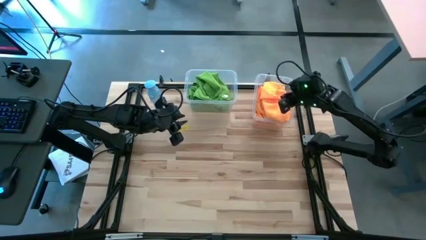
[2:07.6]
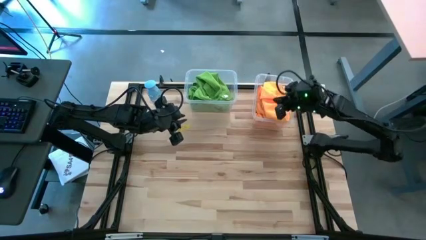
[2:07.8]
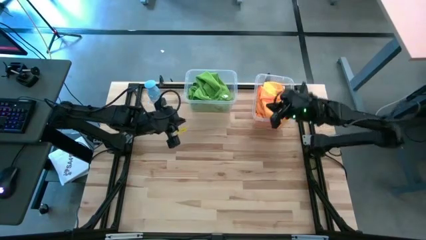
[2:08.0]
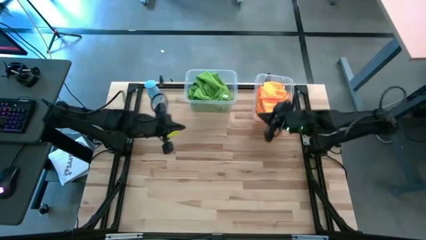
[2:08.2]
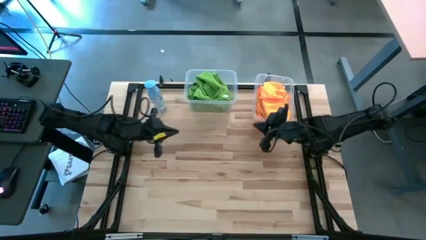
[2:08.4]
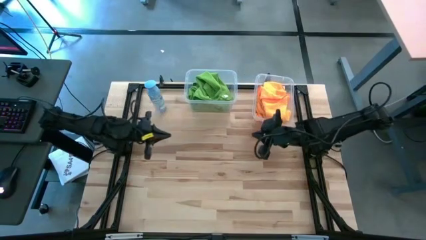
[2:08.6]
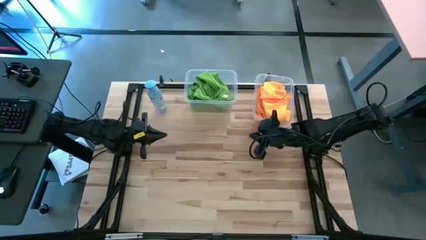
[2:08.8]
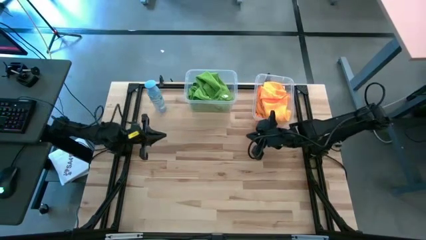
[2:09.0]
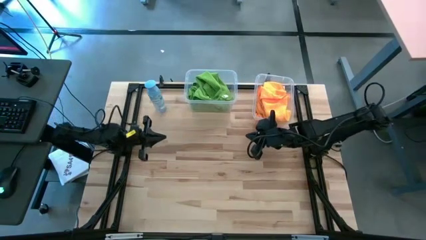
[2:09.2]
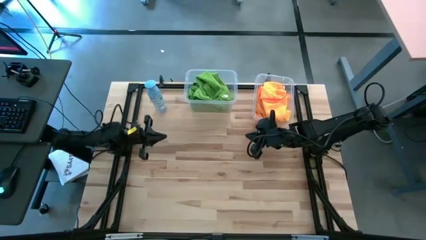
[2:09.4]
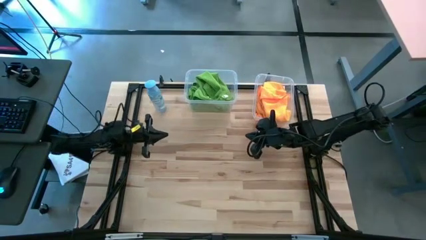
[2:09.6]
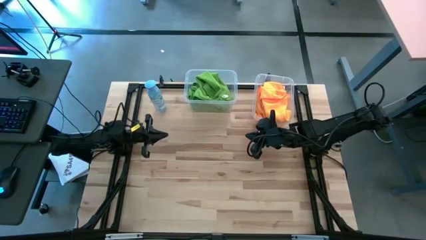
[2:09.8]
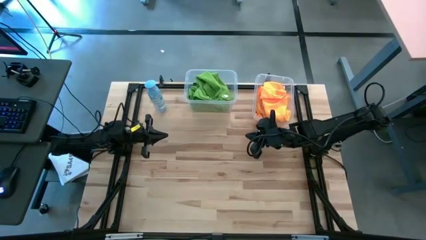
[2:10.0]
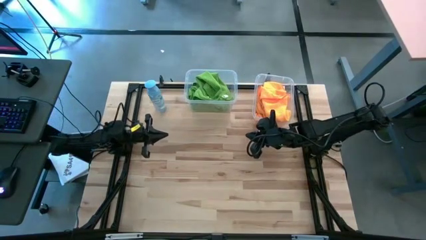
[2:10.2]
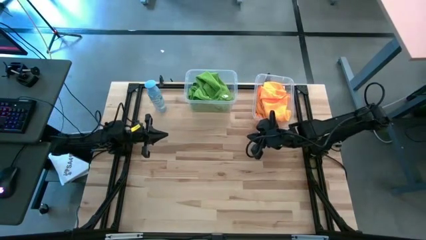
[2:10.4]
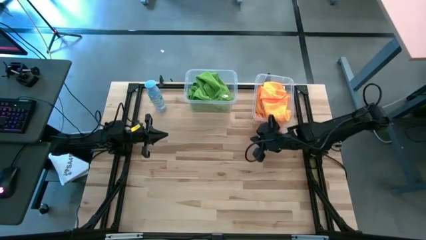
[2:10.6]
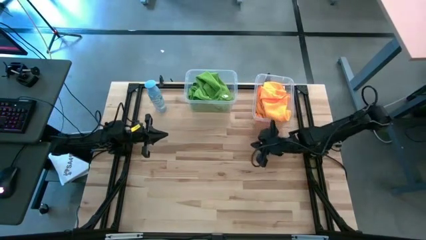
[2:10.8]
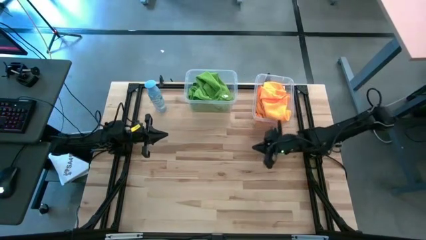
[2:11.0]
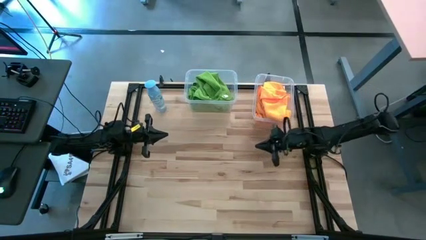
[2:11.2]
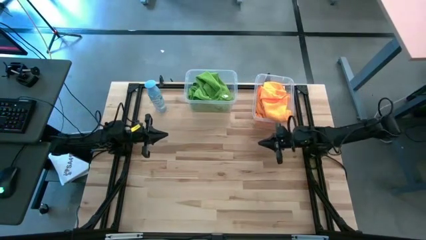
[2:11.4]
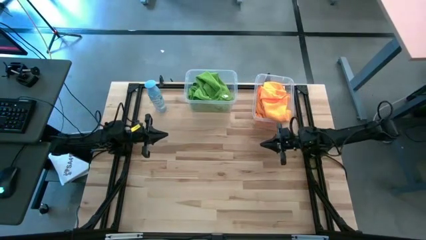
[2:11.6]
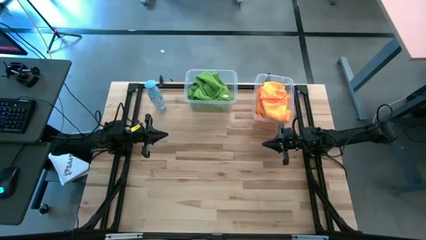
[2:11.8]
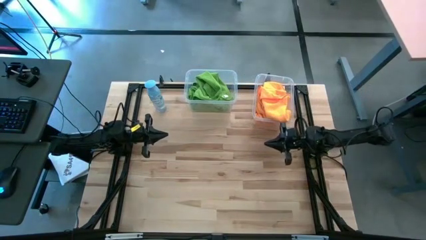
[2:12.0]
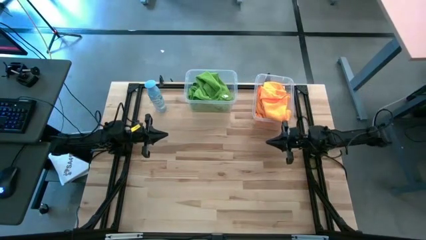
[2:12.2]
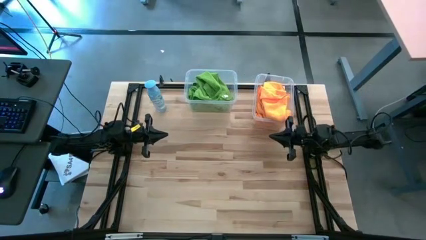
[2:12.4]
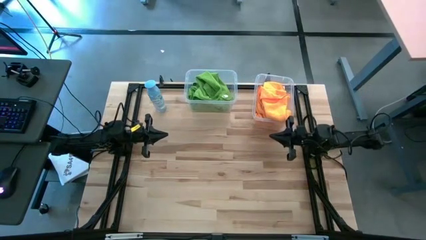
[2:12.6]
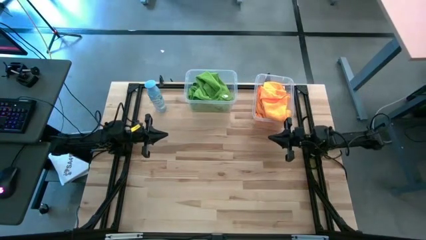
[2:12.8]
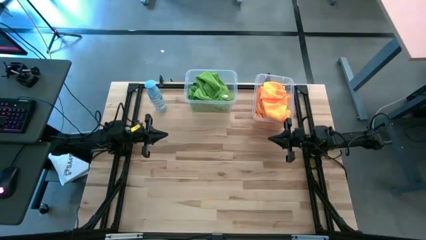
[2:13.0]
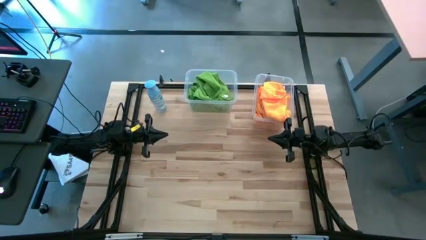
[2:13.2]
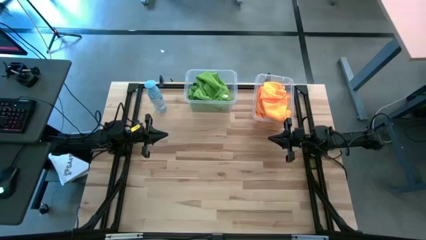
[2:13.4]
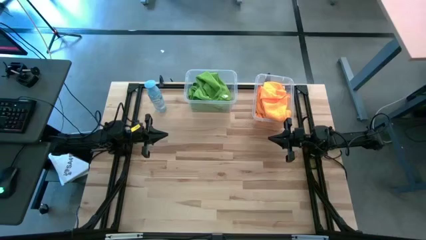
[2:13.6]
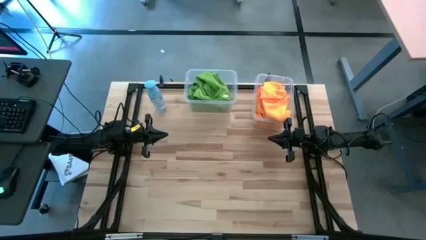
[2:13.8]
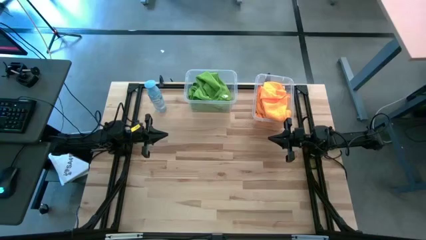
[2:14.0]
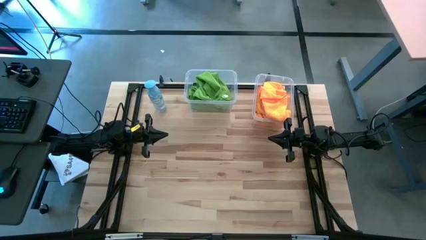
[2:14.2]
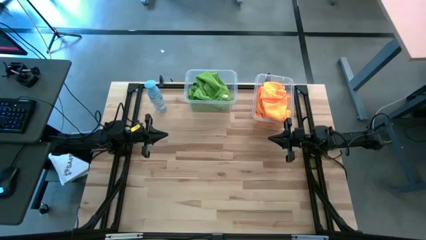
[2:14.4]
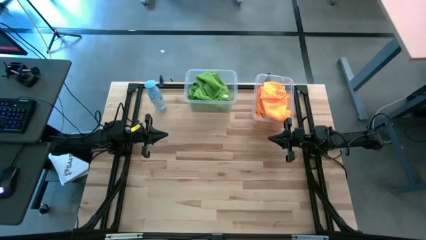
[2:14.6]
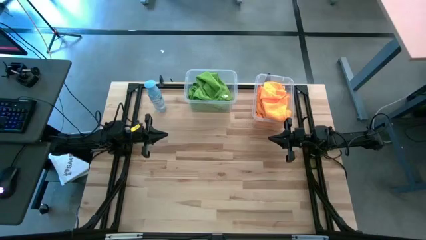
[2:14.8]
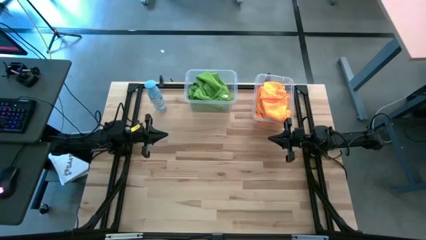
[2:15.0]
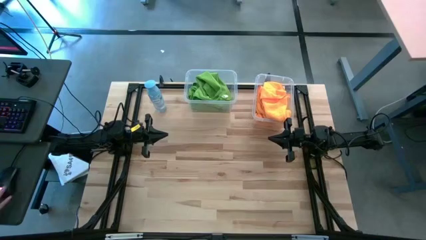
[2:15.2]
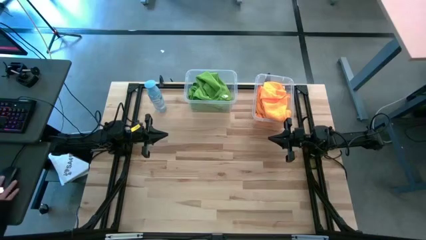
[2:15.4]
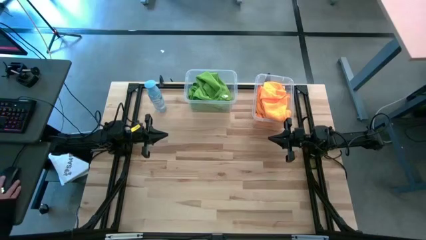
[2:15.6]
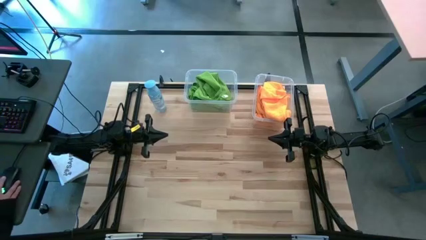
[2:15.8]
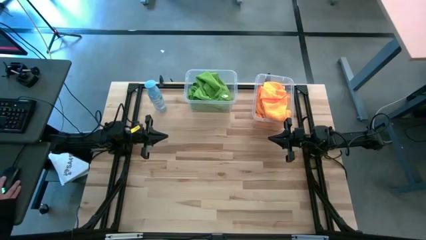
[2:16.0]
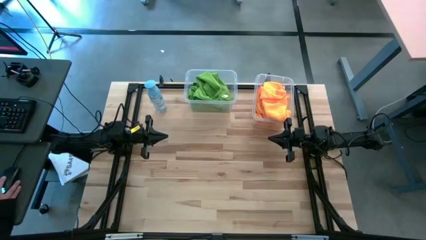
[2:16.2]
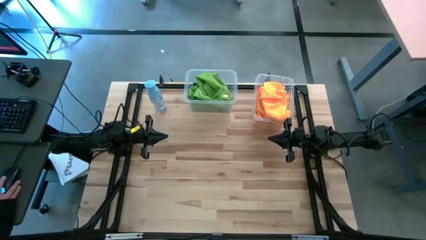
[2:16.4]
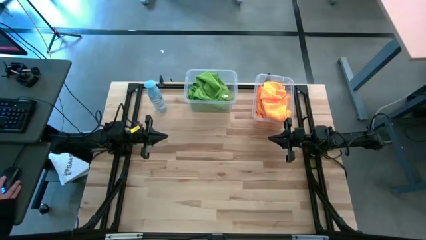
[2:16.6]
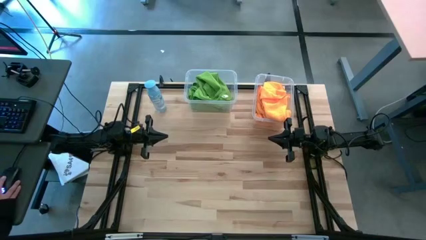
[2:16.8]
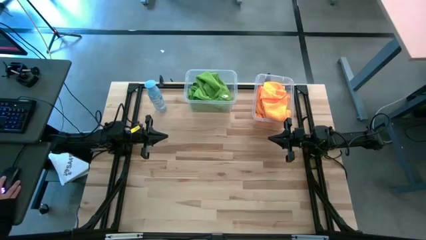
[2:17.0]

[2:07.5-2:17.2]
Task: Sort microfiber towel by color & place in baskets
Return to Home Position

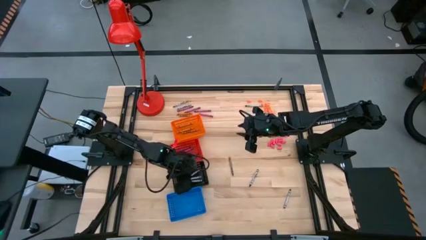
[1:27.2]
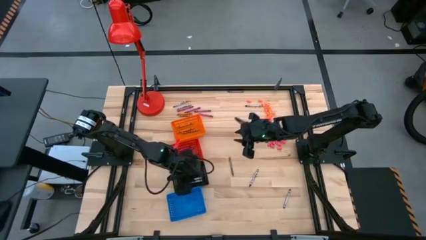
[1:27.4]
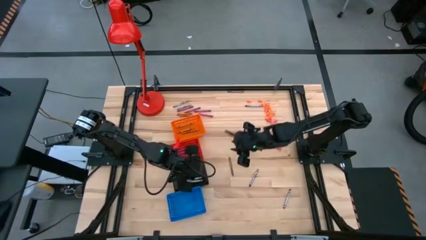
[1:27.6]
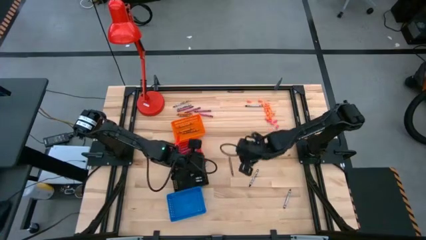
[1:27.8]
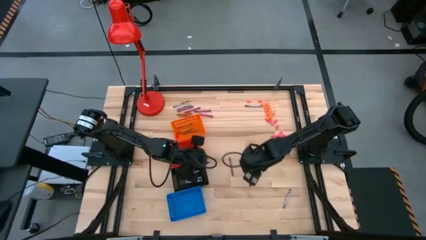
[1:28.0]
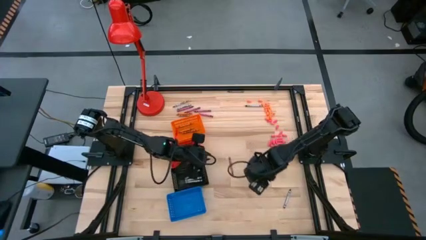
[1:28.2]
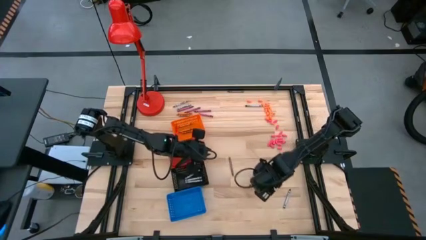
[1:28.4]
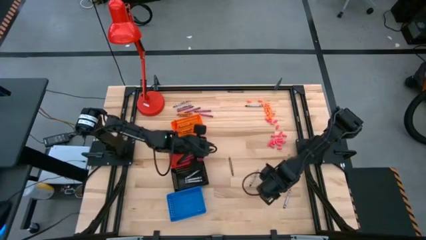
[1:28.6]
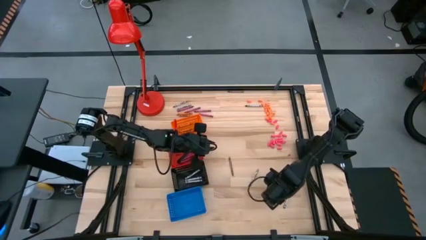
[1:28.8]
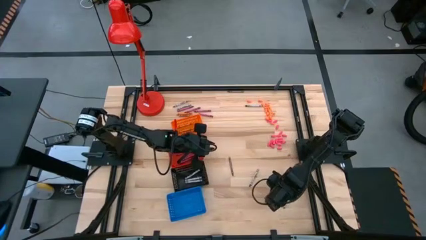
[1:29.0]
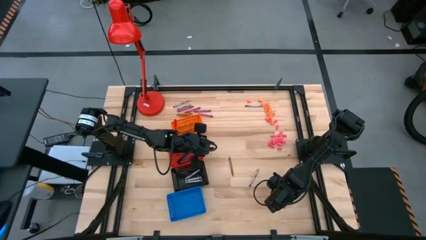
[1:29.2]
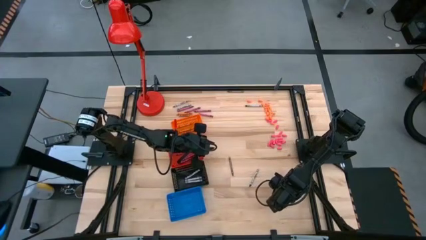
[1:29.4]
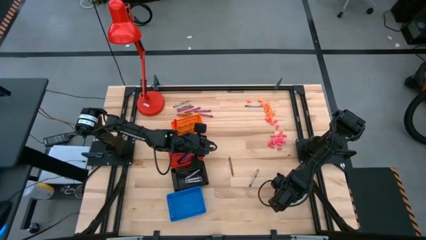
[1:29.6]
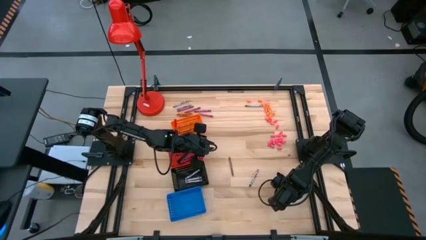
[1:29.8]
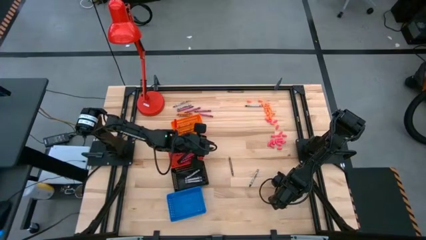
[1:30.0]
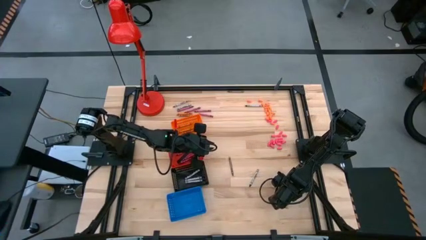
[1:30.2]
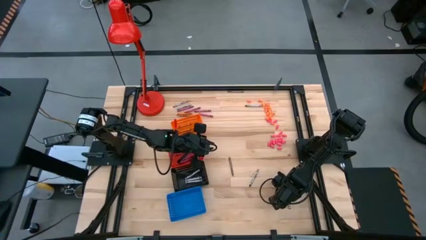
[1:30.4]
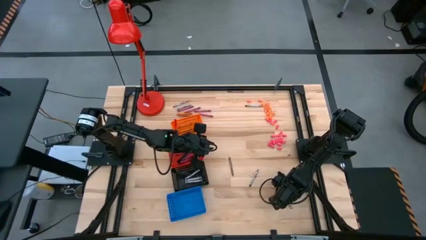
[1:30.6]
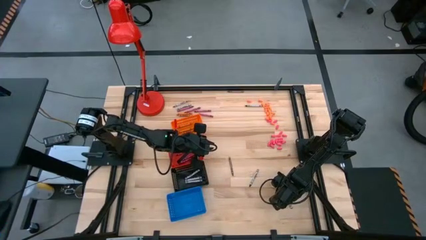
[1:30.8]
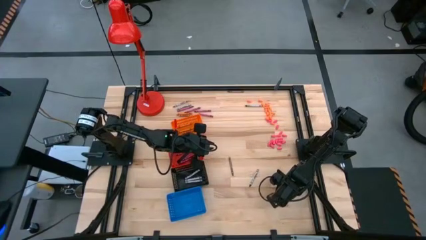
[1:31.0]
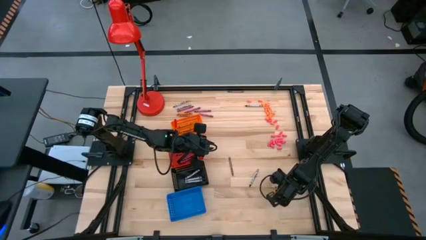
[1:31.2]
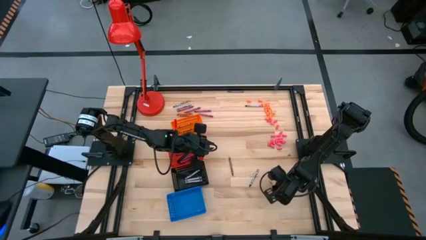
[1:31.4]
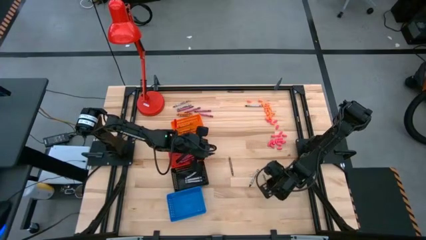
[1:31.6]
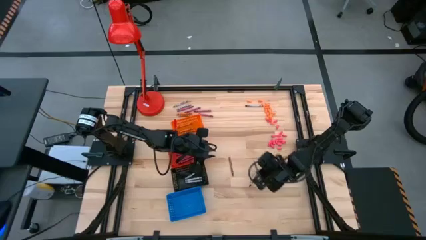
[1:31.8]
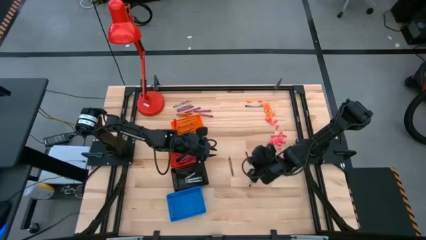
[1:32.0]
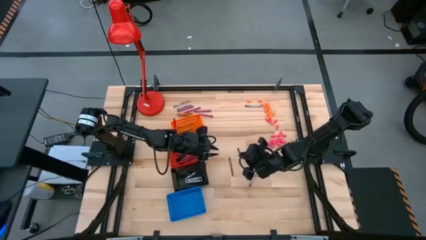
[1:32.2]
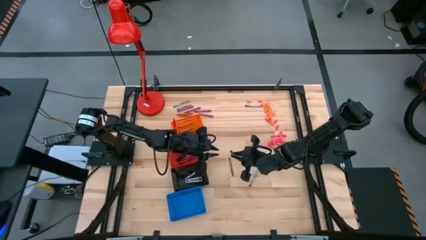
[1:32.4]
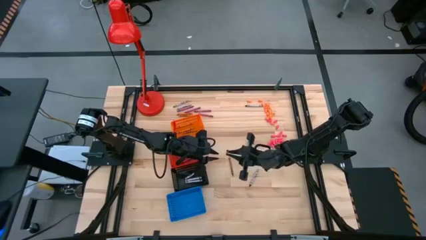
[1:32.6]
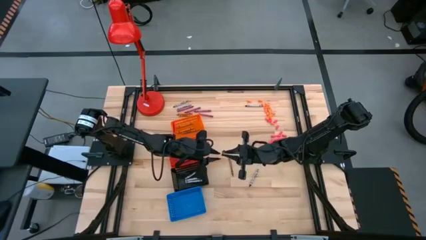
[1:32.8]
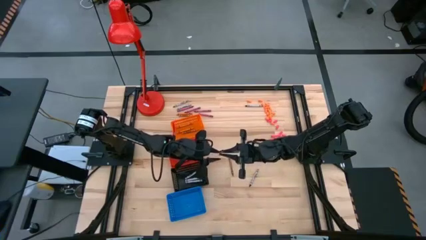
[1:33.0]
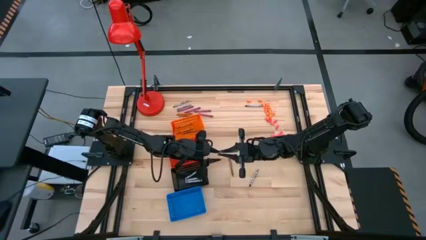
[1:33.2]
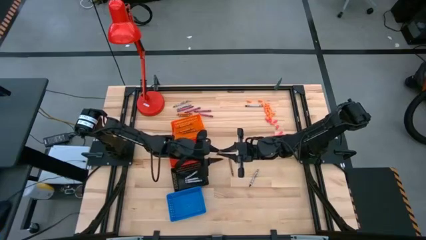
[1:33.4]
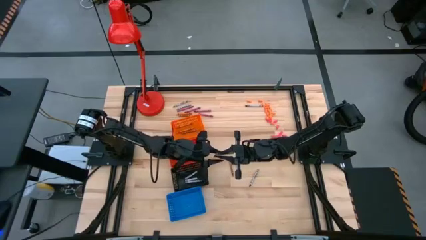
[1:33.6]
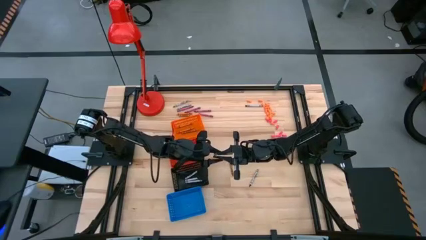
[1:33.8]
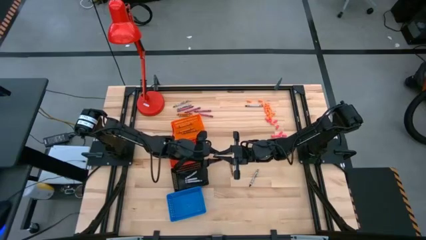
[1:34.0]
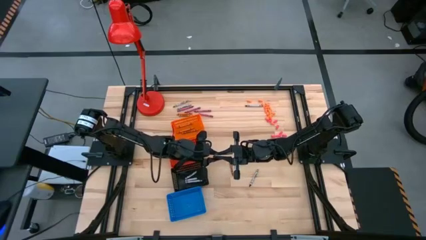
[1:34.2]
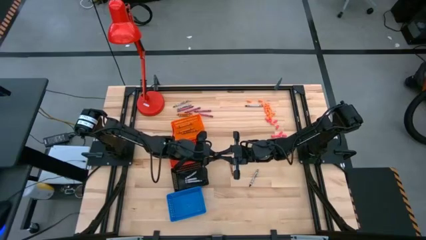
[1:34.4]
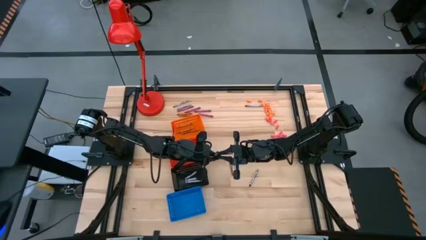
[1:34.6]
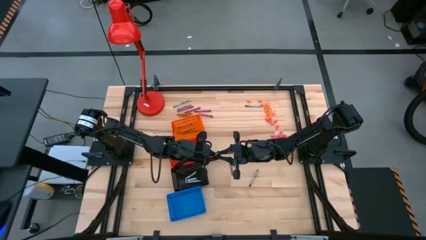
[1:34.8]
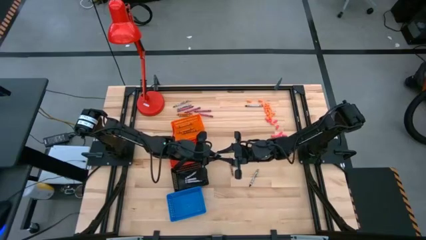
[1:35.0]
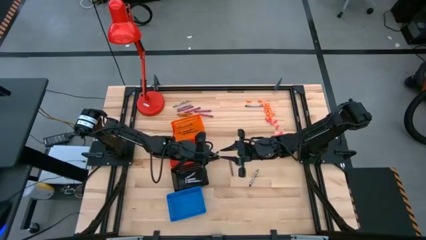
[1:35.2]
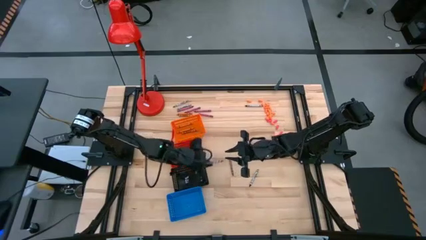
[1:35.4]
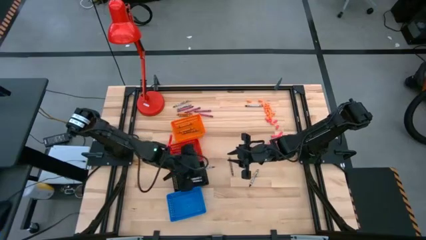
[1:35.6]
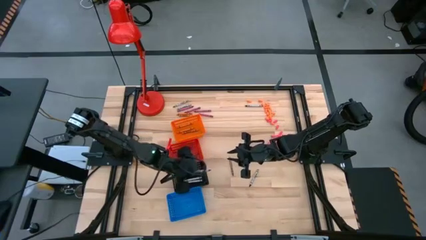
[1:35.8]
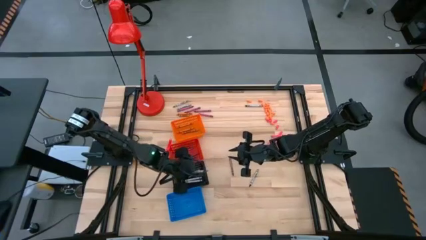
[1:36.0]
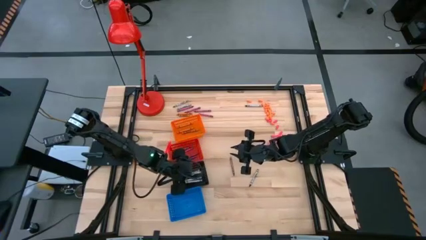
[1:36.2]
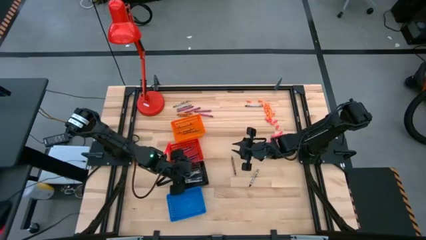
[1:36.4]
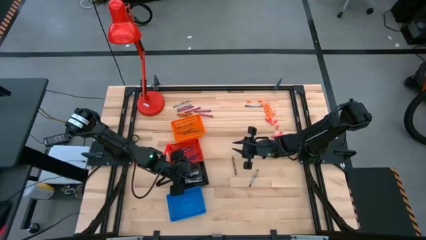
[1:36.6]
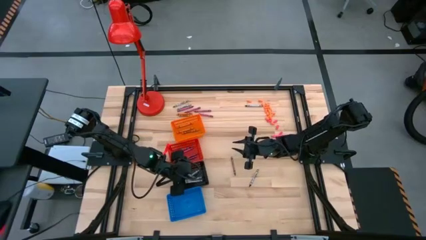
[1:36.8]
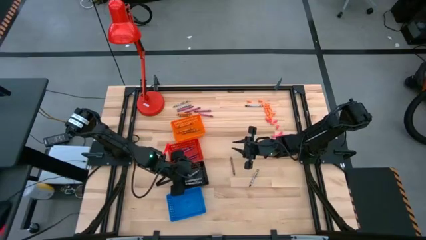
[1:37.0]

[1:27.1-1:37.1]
Task: Sort crayons
Put the black crayon into the black basket
